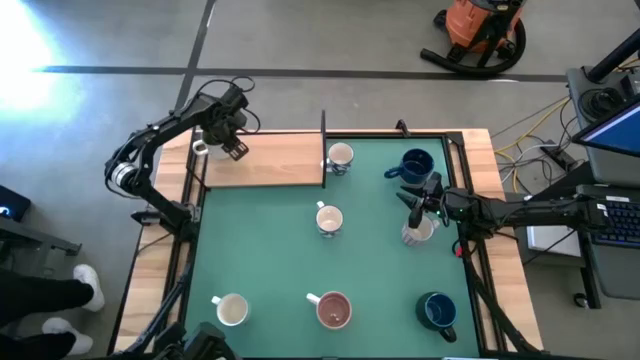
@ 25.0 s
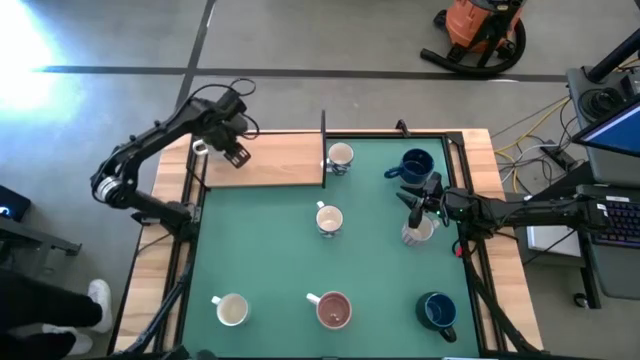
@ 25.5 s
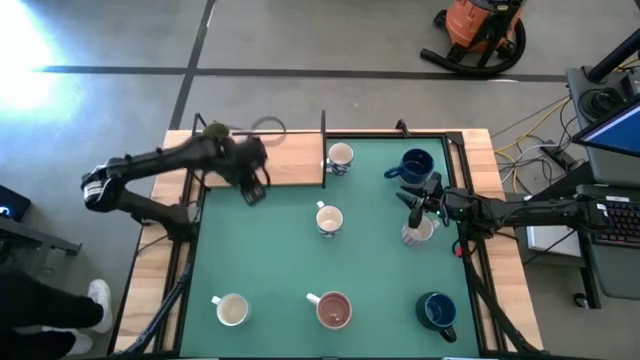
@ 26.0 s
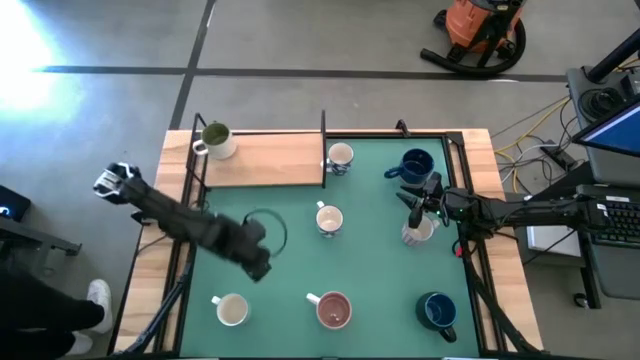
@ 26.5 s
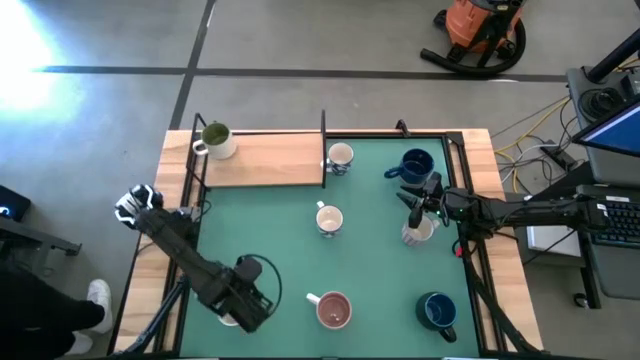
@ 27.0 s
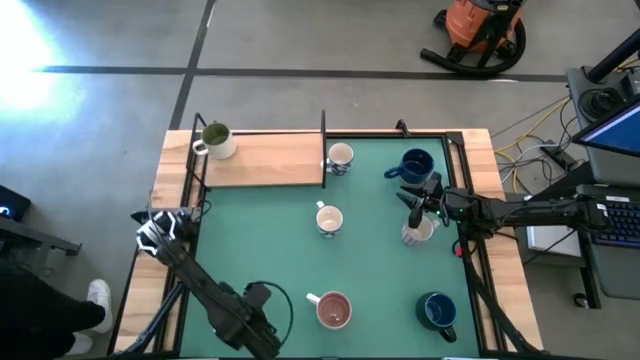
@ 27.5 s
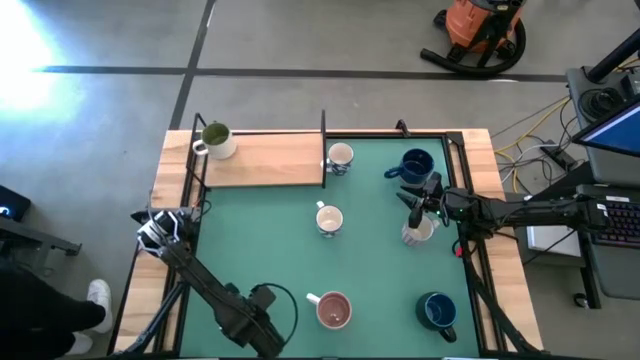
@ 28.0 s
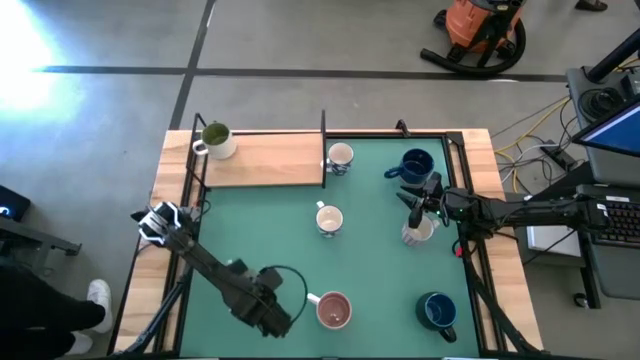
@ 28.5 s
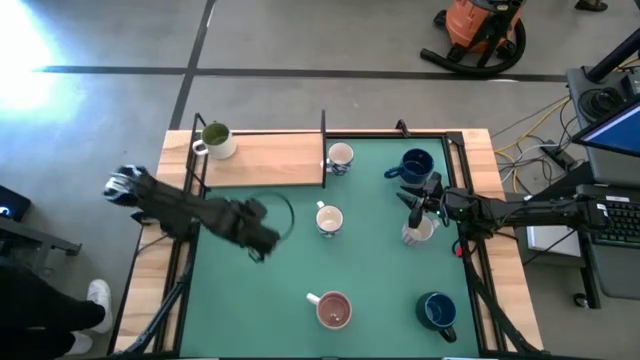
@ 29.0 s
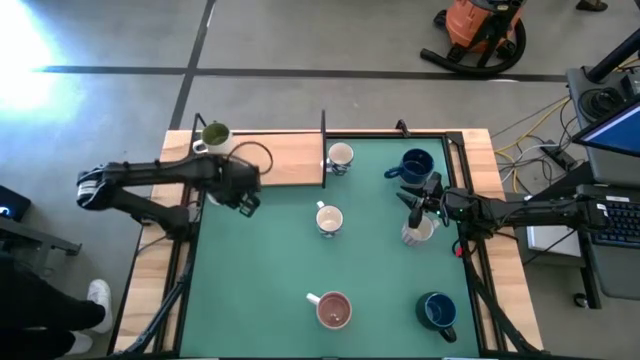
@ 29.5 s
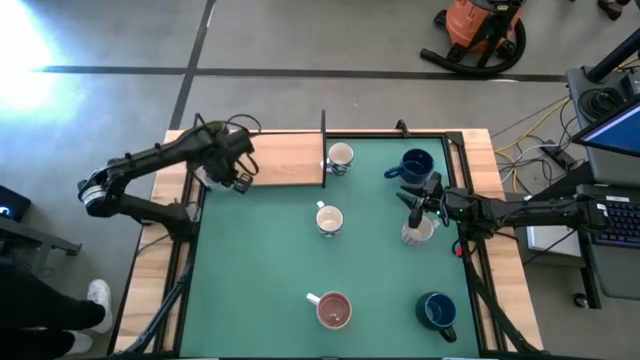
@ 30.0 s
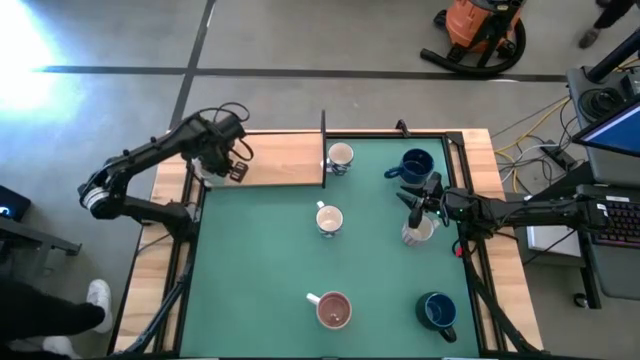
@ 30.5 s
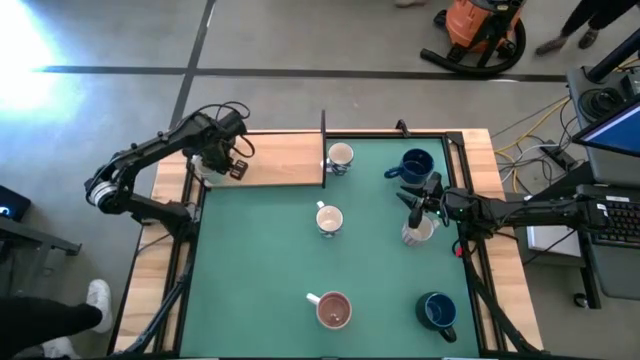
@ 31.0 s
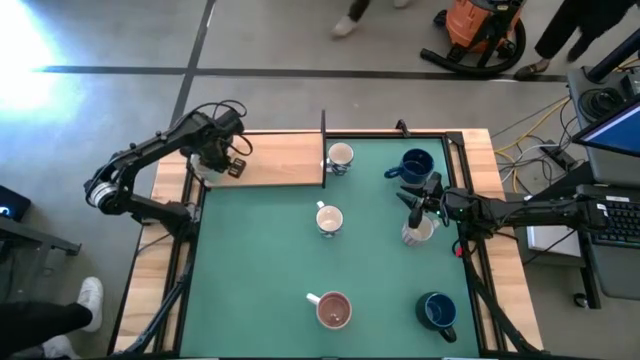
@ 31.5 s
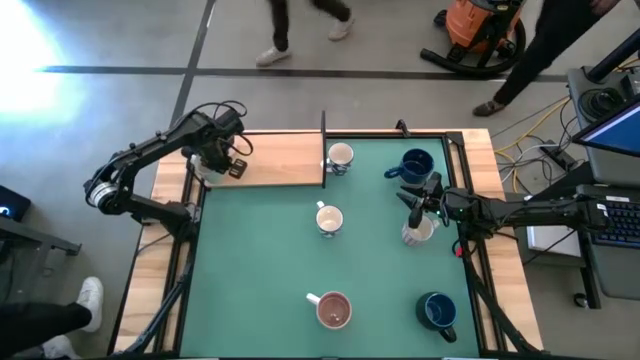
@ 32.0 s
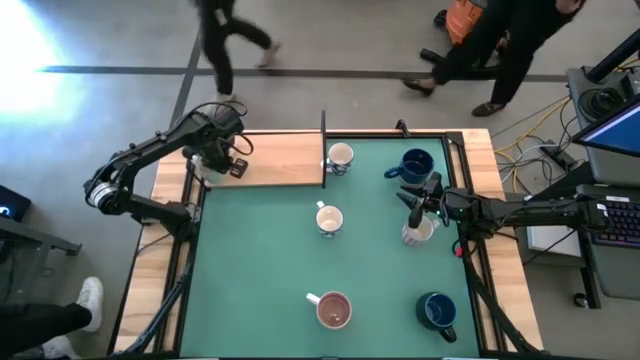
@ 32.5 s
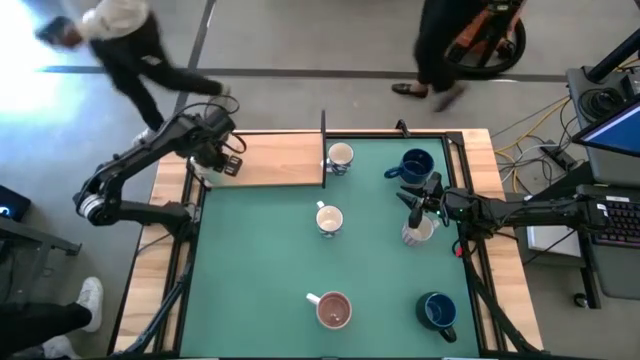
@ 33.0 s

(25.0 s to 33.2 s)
Task: Place coffee mugs
Put the green patterned mug on the shelf

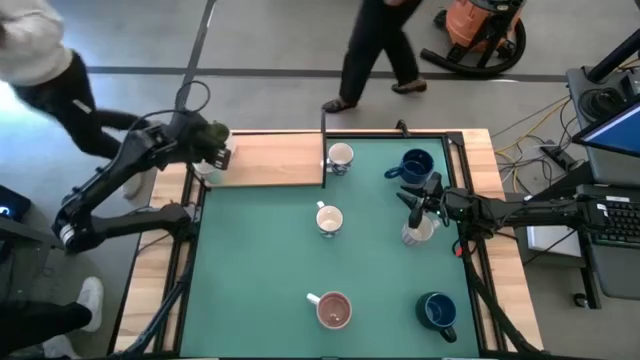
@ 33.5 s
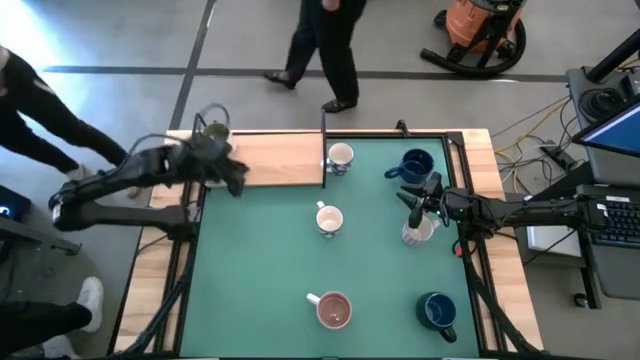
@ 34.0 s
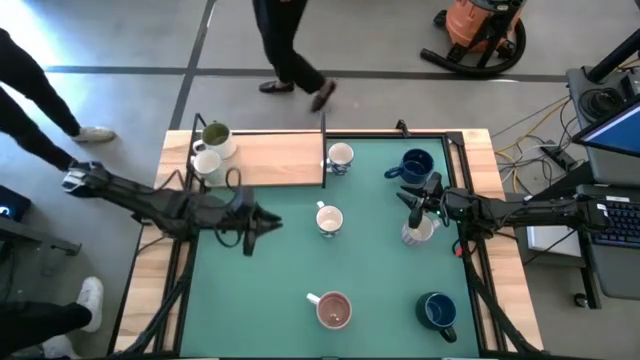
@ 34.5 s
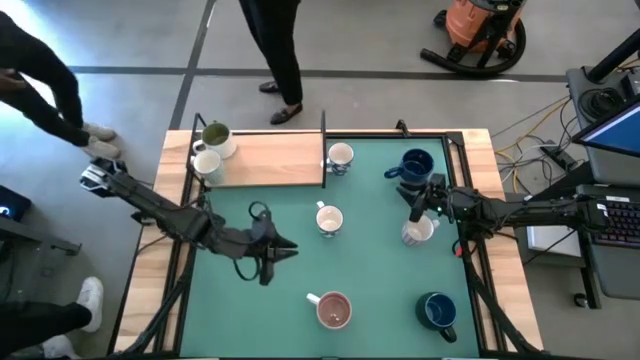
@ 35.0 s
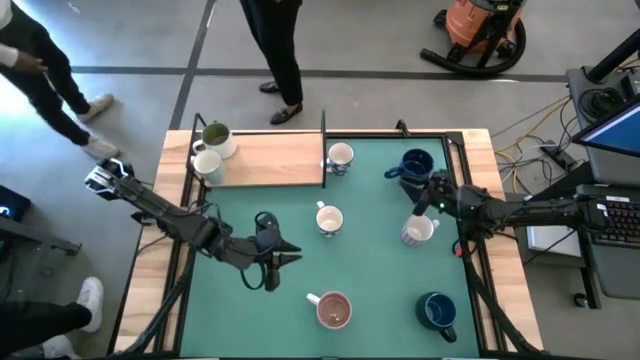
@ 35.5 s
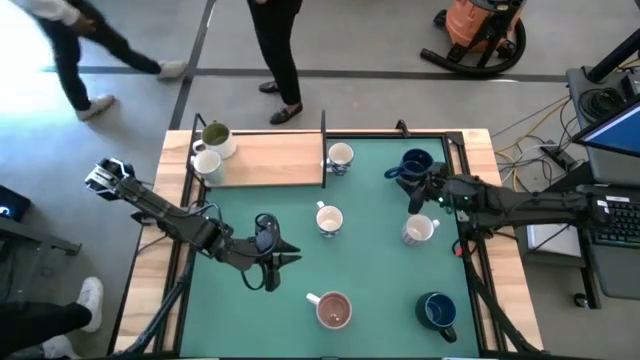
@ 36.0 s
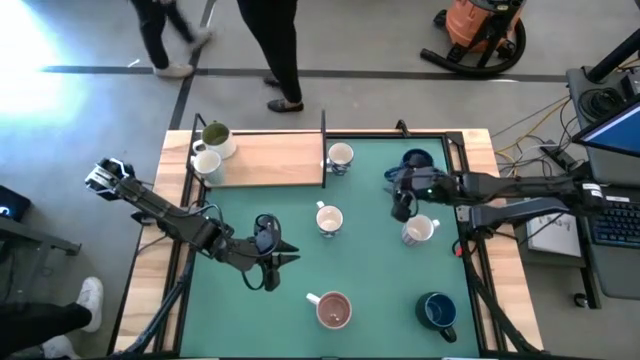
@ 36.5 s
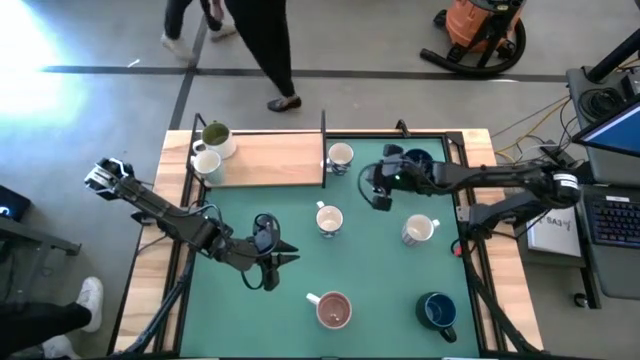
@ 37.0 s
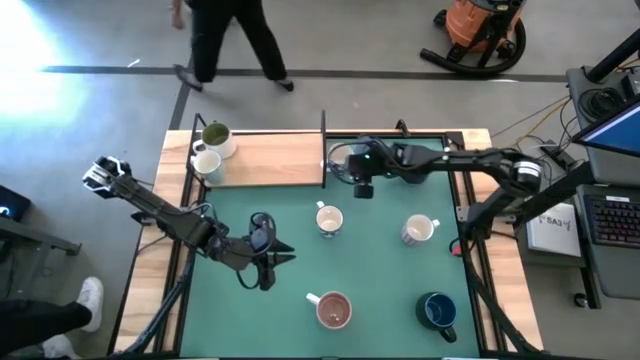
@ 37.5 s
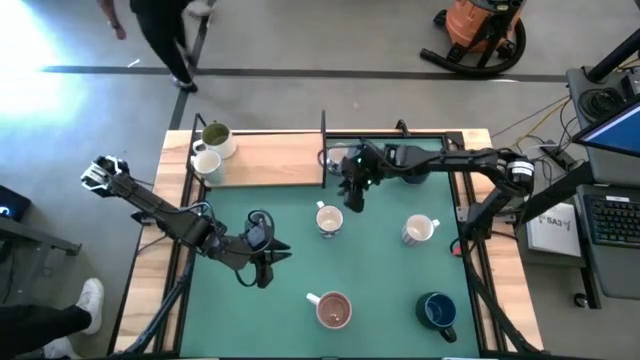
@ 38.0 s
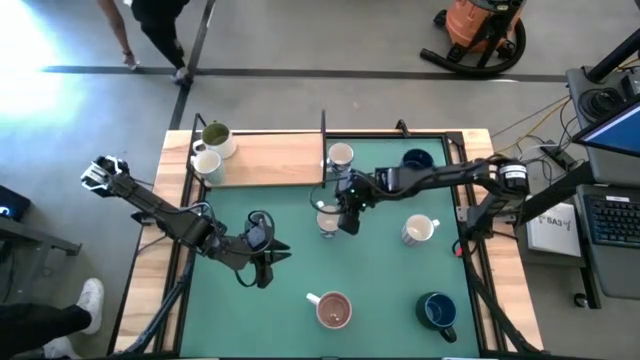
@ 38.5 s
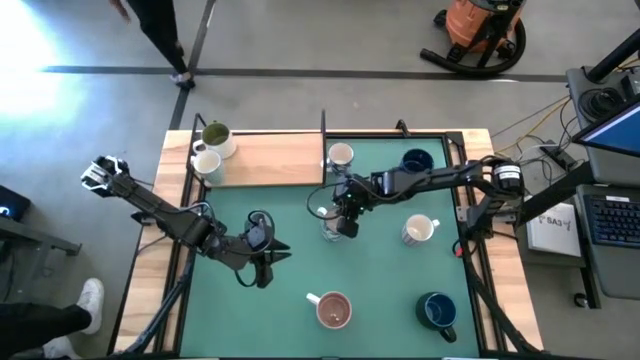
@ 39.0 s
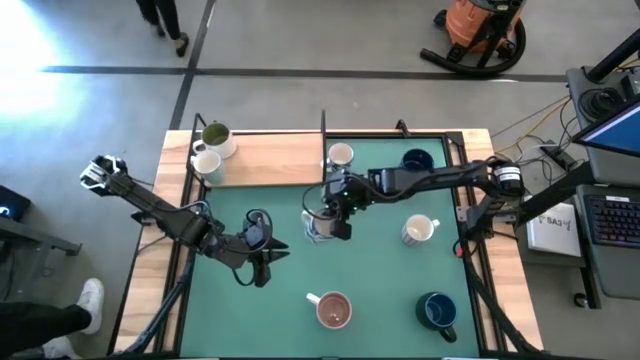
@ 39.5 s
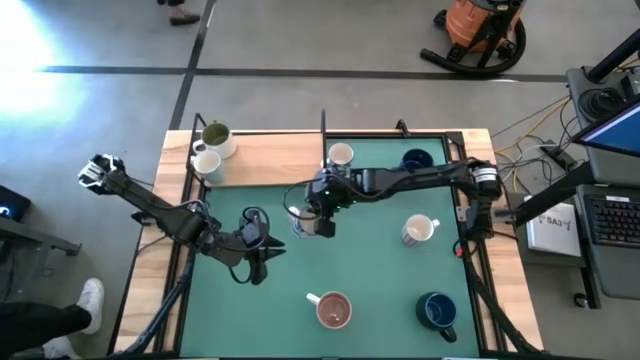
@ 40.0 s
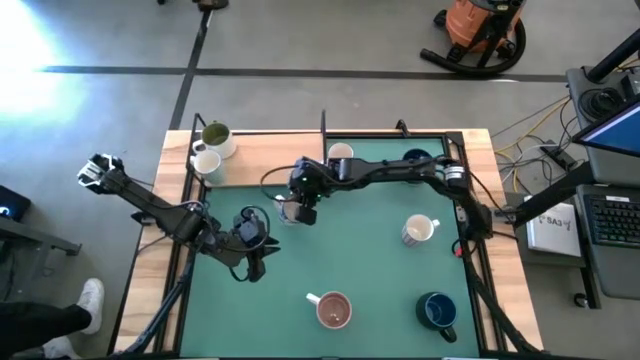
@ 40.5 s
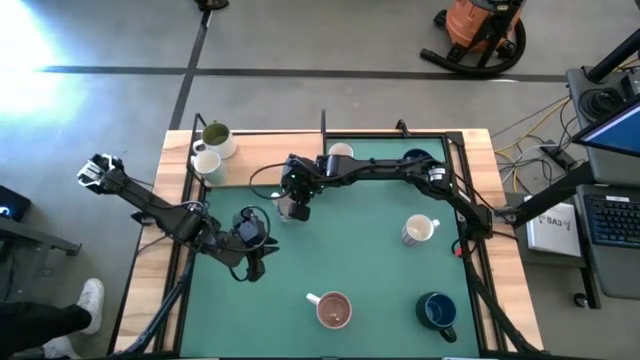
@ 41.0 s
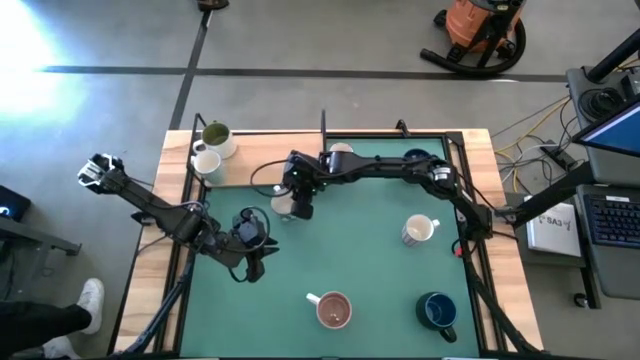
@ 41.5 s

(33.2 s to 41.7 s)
Move the bottom blue patterned mug to the center of the table

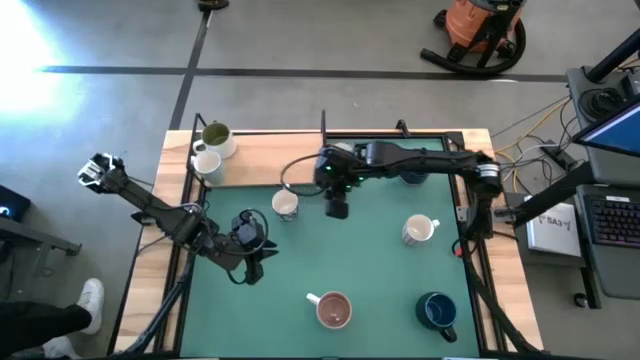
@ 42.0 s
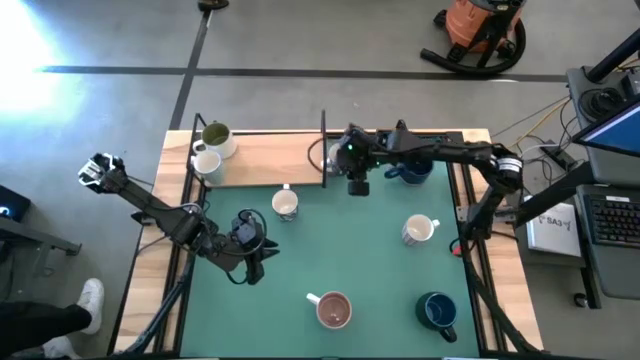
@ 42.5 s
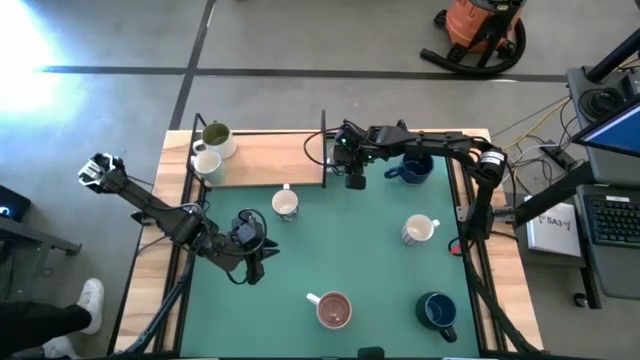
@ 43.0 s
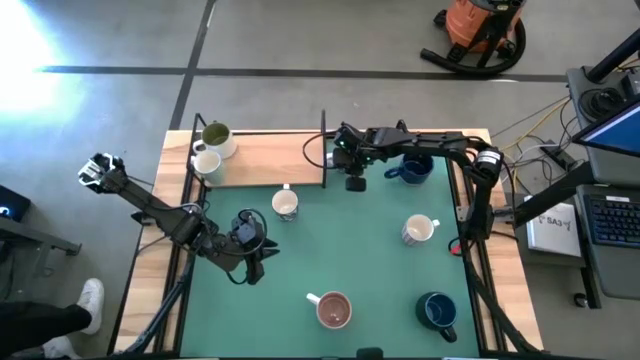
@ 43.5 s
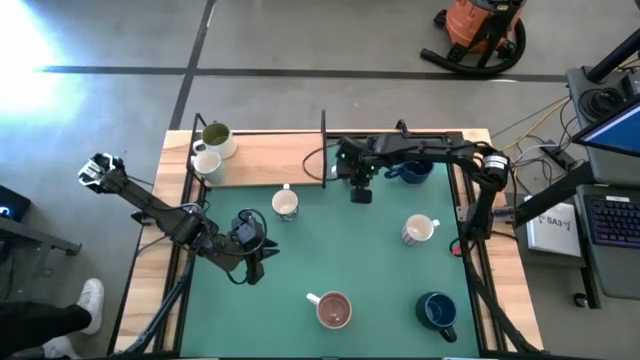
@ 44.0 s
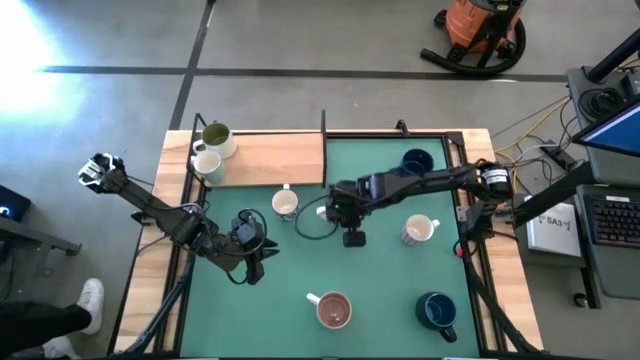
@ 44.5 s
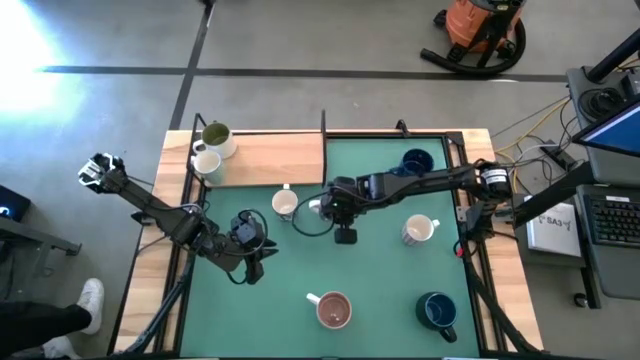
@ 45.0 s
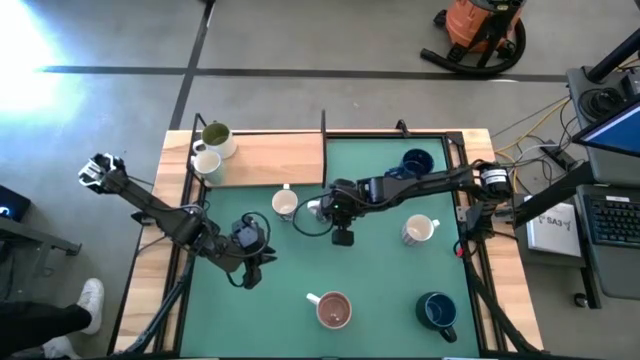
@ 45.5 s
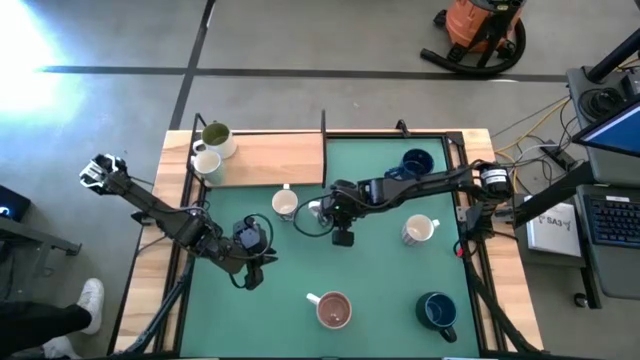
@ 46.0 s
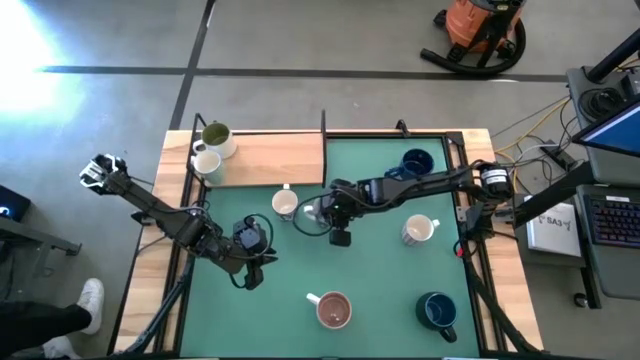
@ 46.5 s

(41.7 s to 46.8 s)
Move the top blue patterned mug to the center of the table
